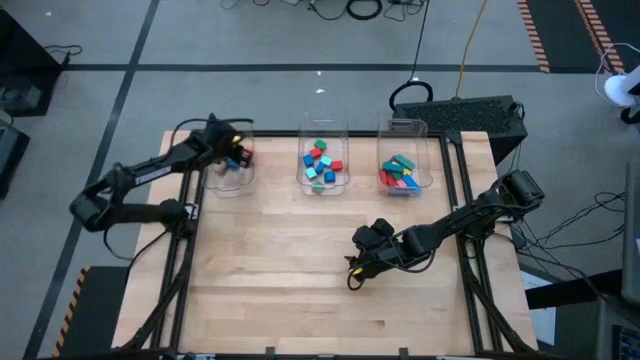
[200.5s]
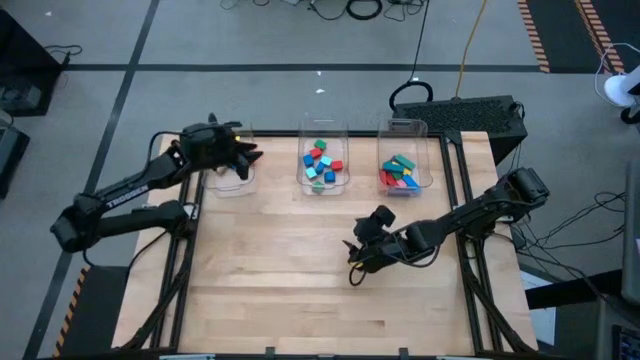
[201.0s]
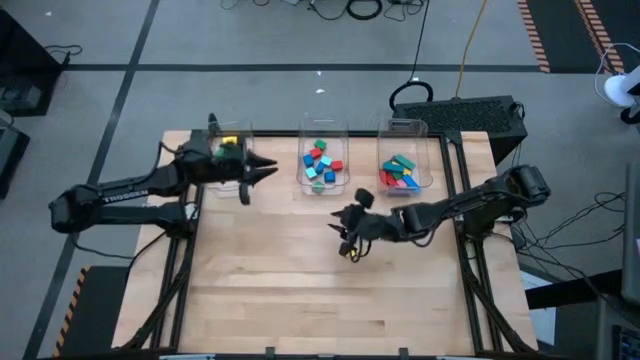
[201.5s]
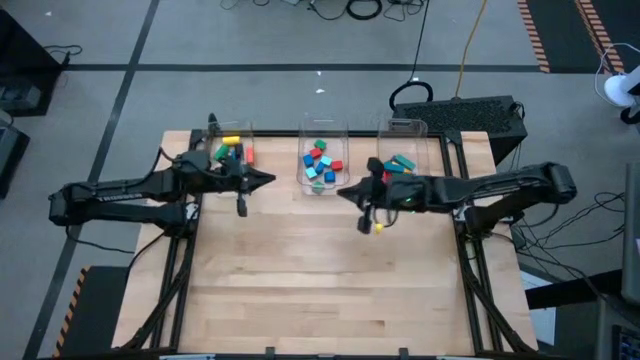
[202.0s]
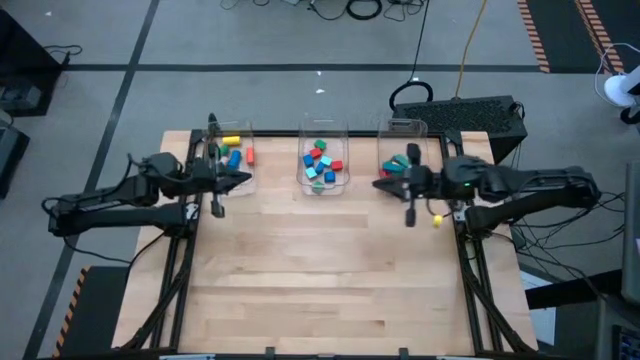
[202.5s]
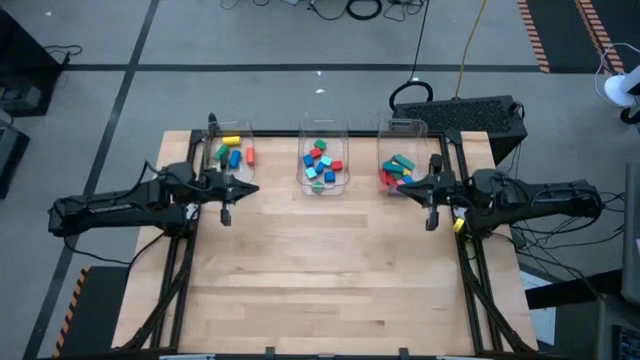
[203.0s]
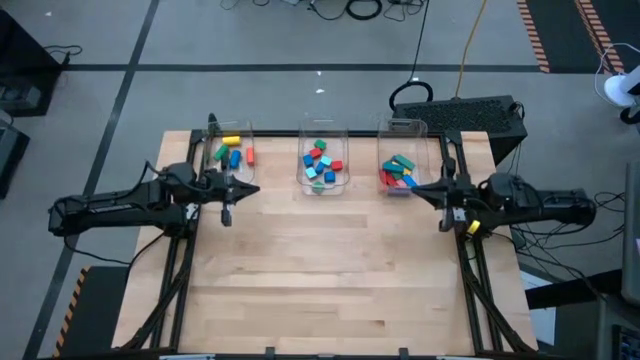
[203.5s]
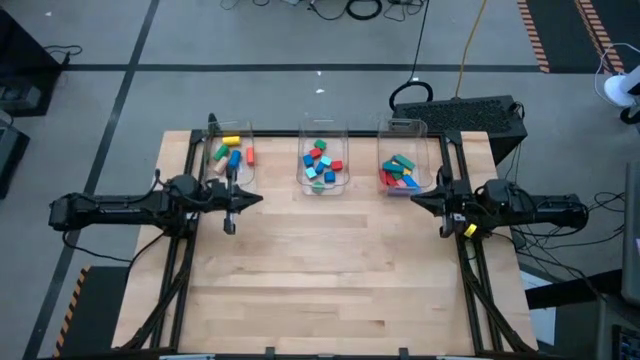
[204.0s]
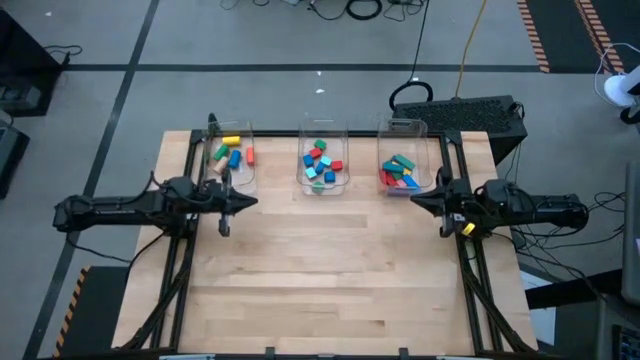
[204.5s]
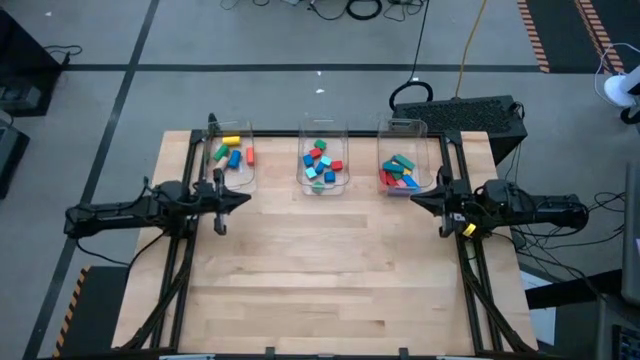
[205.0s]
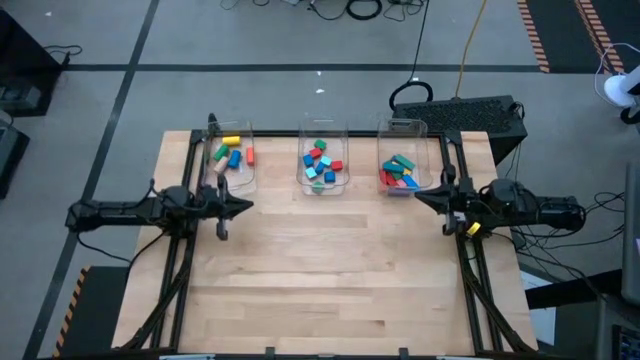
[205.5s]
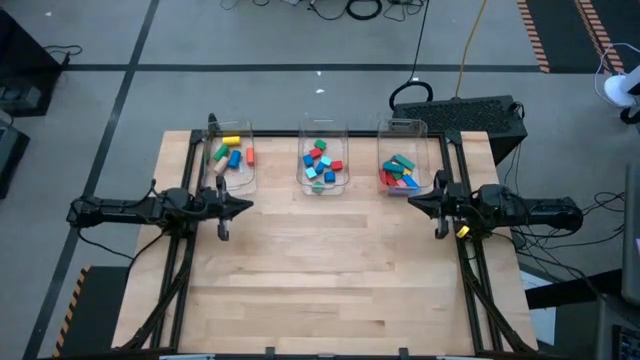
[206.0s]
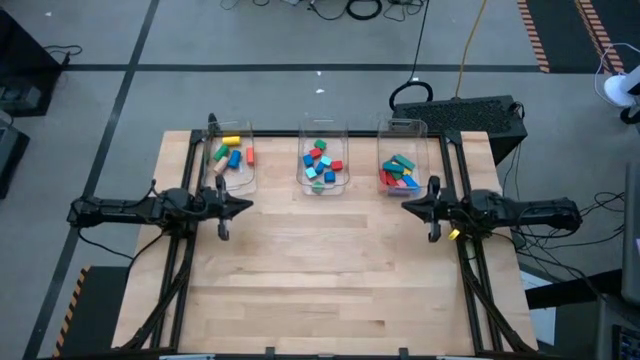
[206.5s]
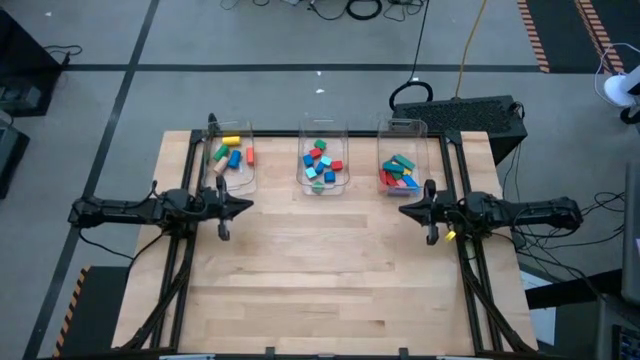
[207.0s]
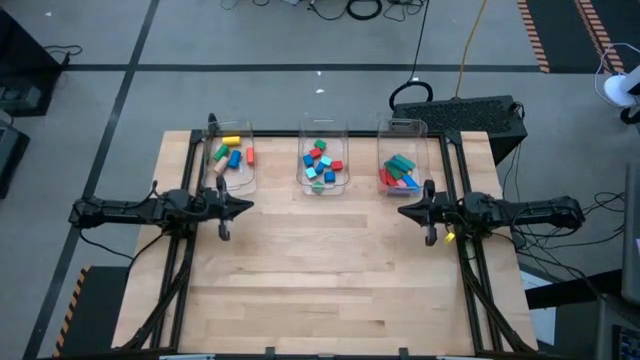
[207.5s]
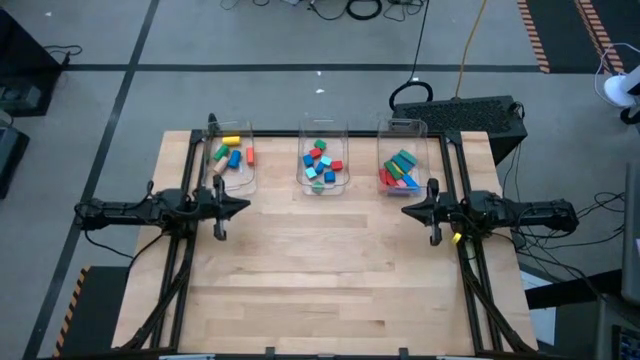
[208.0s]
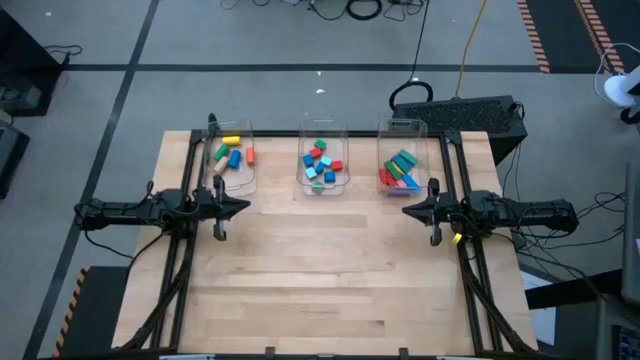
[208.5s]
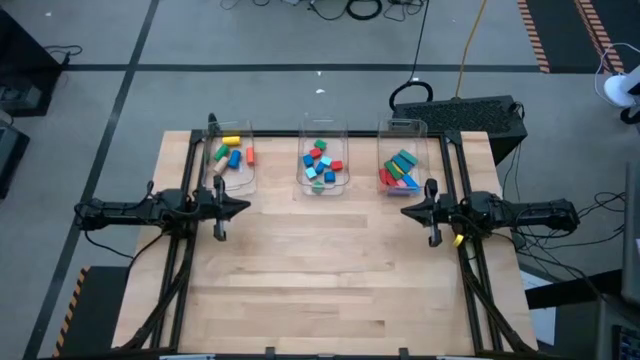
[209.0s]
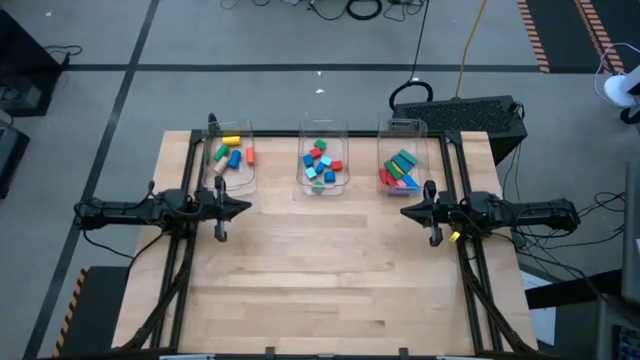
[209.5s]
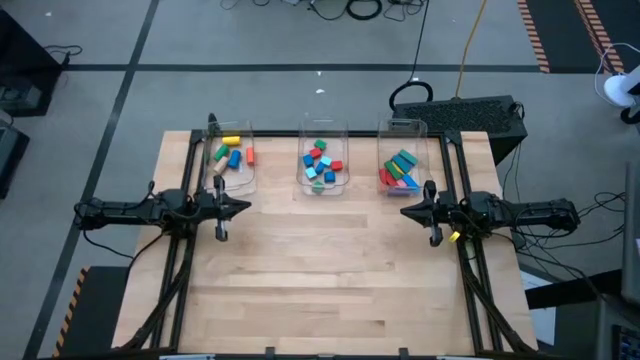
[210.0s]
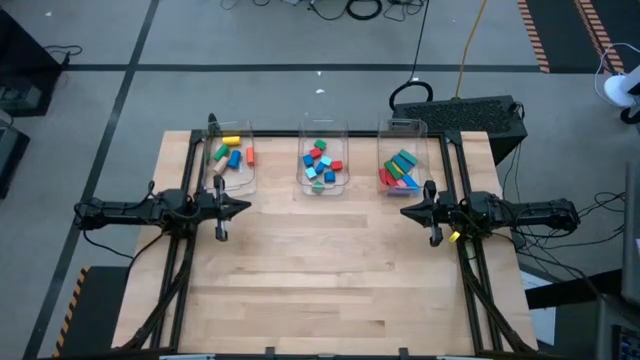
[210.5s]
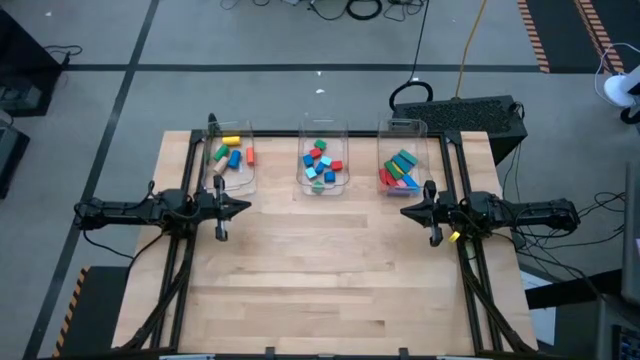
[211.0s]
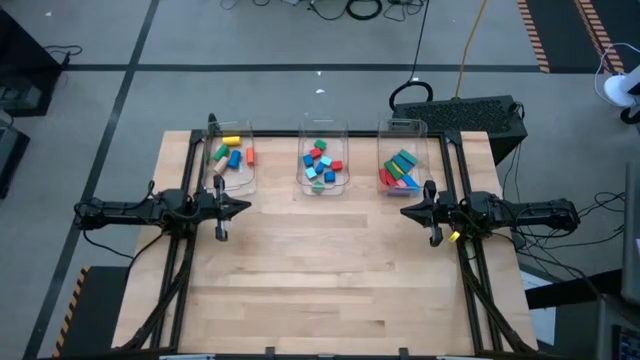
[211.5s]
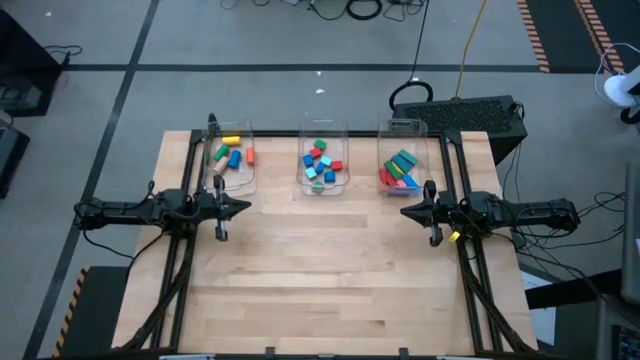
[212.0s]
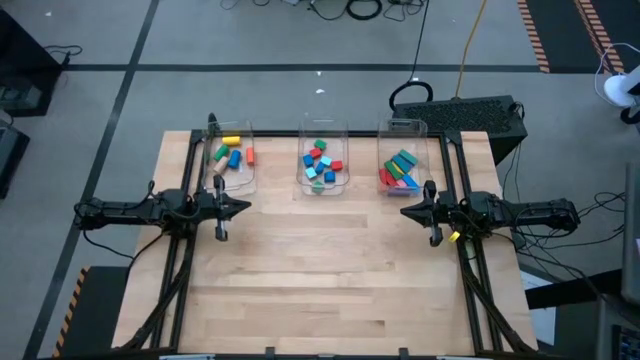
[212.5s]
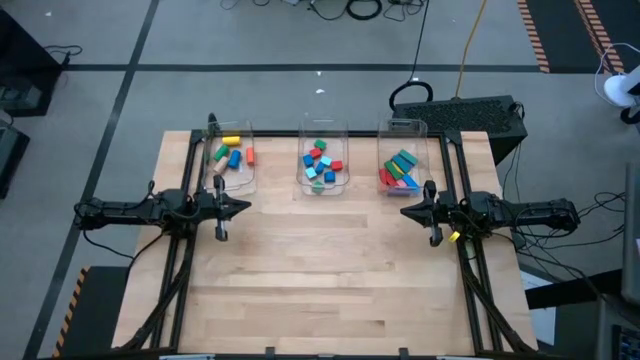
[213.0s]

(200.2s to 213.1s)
Task: Sort blocks by size
Return to Home Position

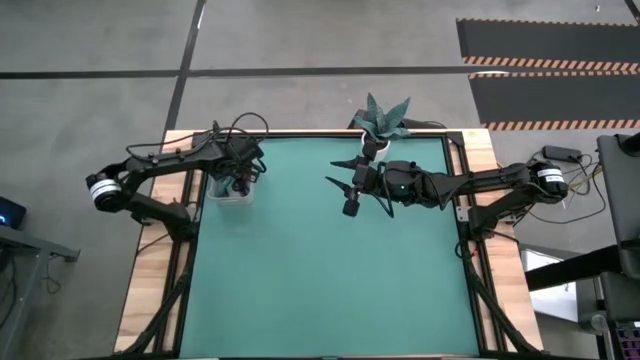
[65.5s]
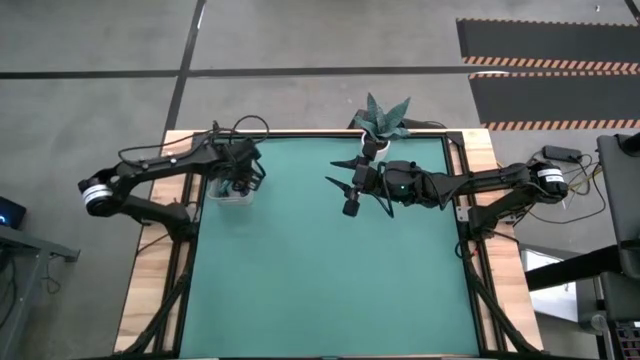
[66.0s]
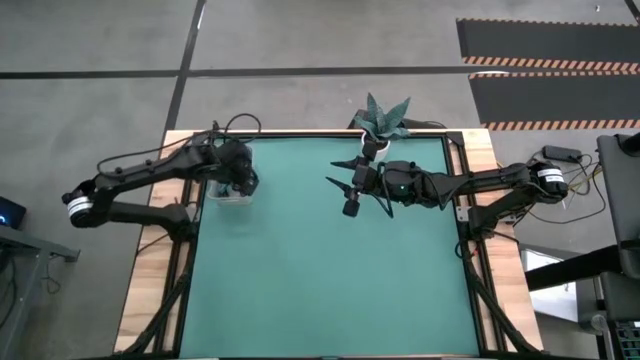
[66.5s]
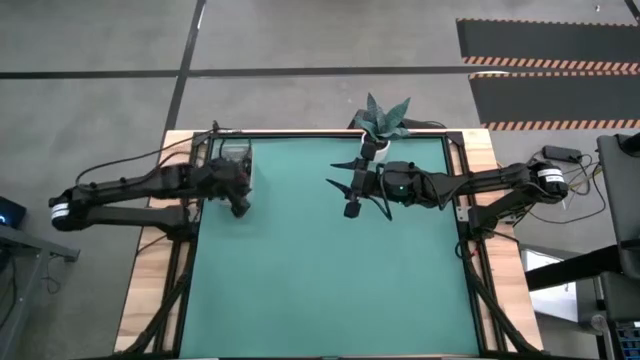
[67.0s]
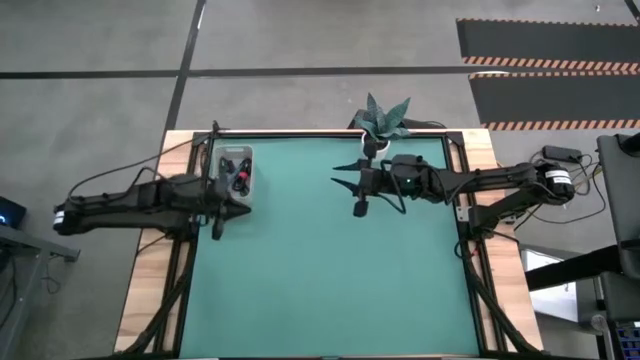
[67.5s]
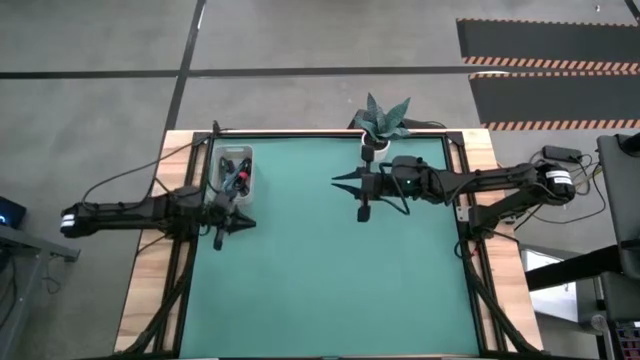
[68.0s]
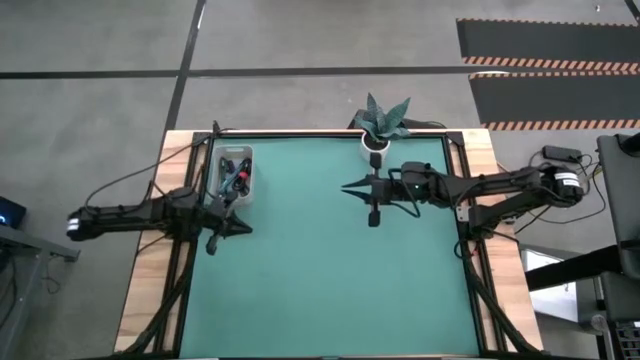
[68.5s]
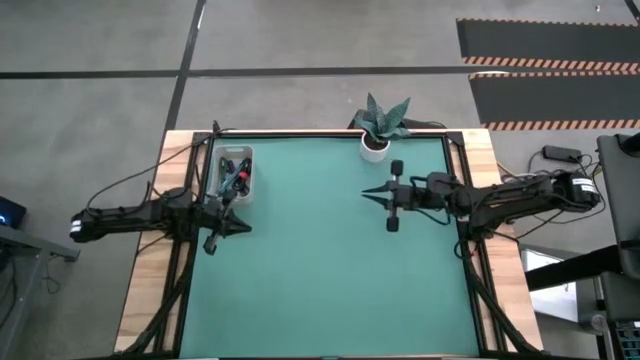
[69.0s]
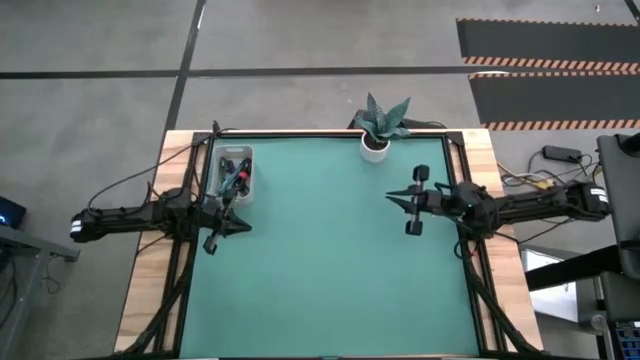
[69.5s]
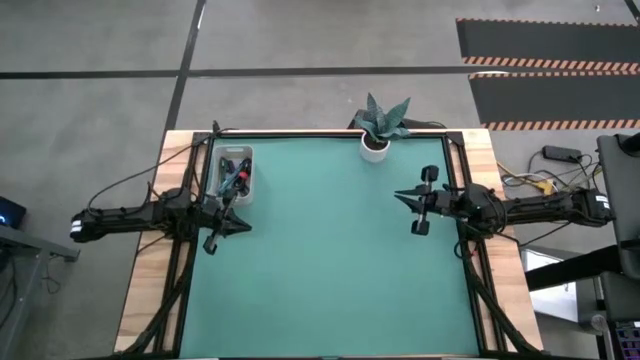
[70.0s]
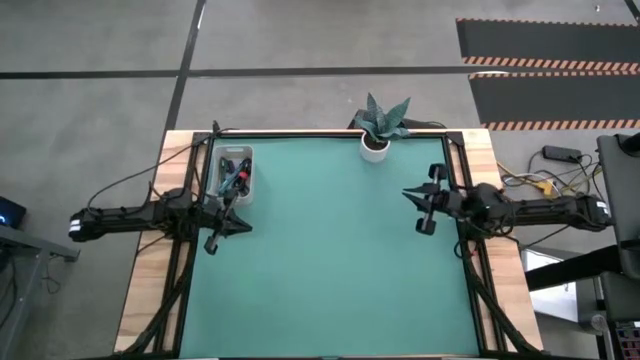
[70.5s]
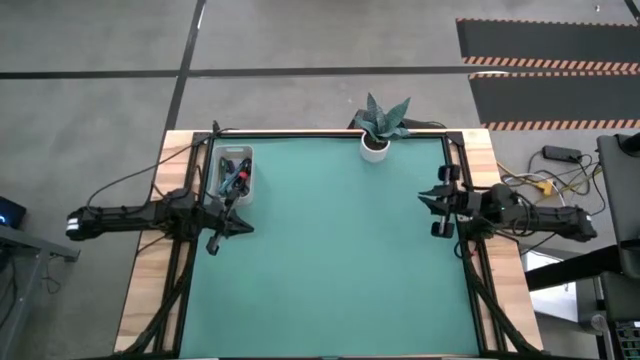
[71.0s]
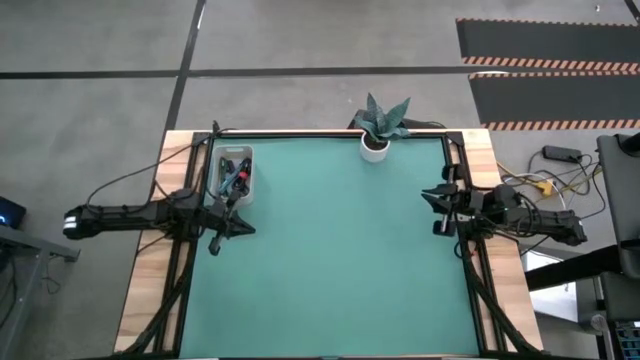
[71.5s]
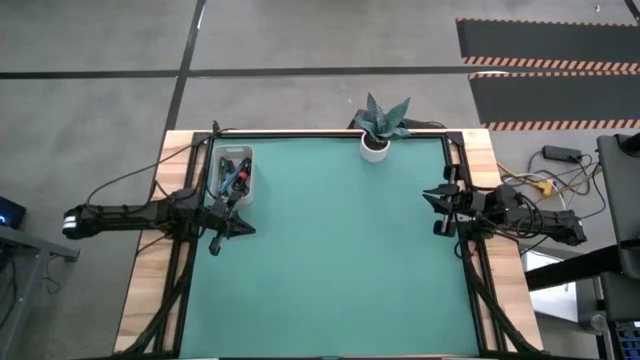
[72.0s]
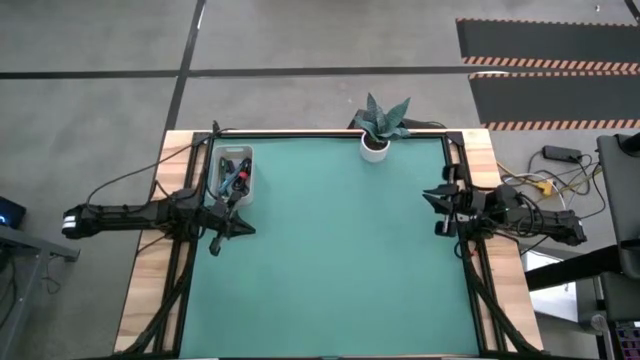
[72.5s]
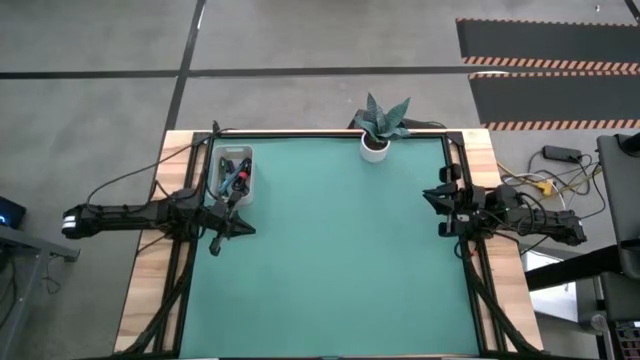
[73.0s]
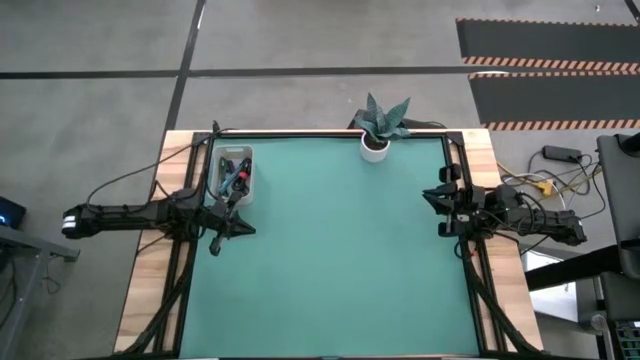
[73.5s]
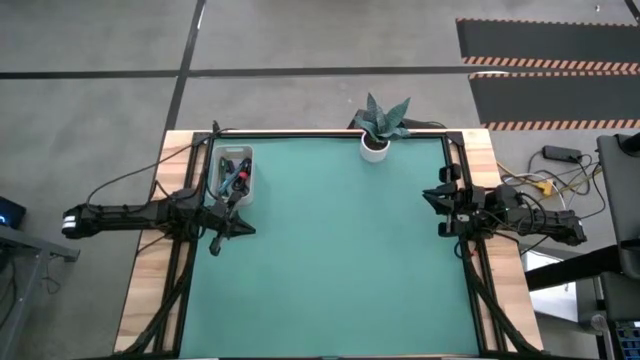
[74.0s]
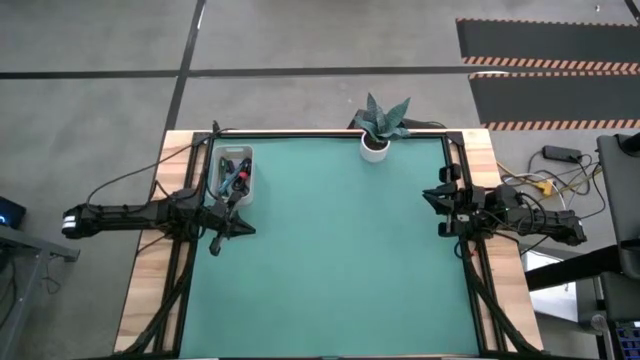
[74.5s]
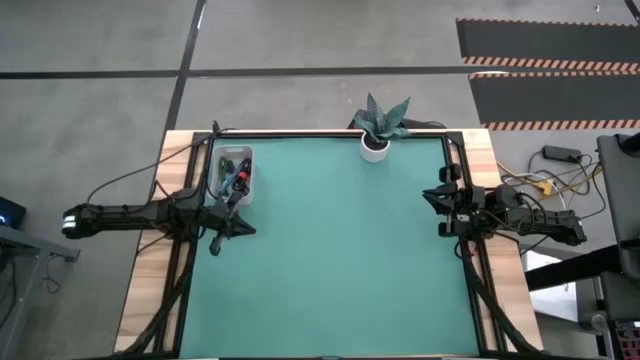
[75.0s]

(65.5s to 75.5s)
Task: Pick and place USB-C Cables
Return to Home Position
